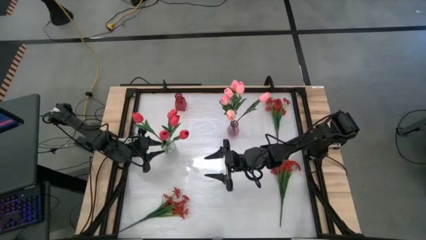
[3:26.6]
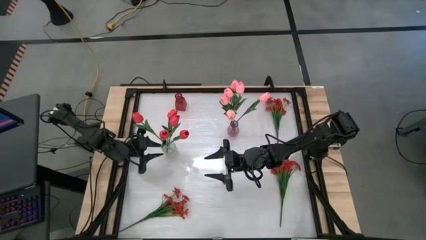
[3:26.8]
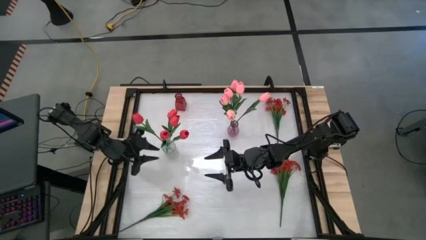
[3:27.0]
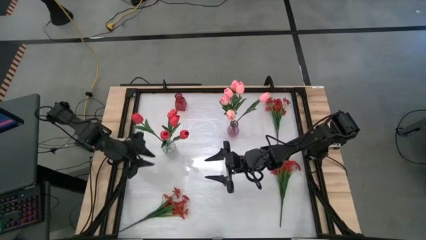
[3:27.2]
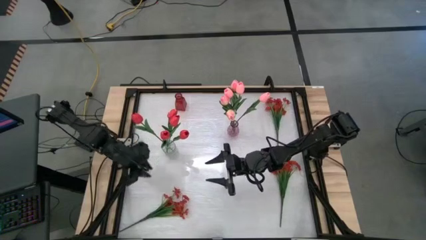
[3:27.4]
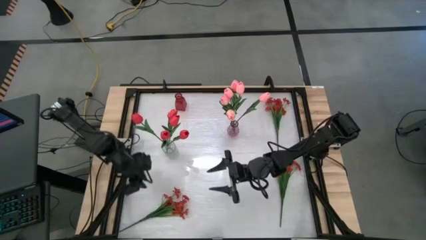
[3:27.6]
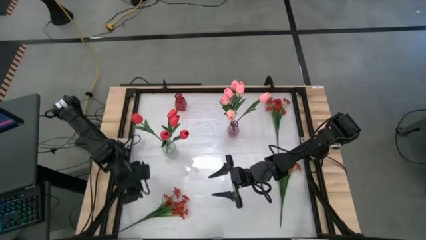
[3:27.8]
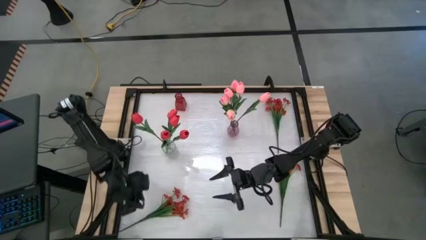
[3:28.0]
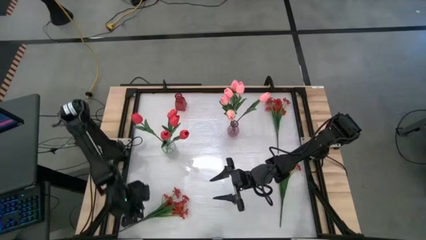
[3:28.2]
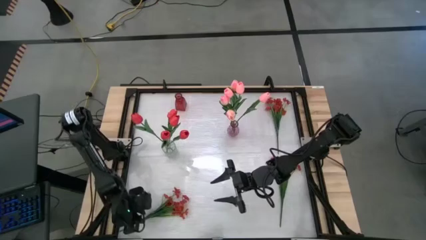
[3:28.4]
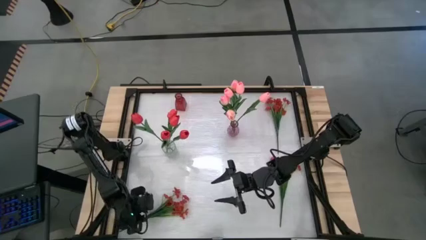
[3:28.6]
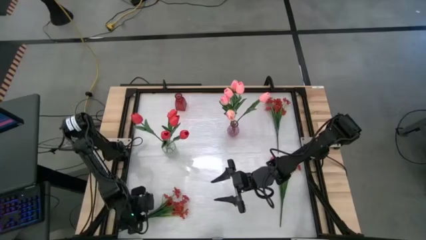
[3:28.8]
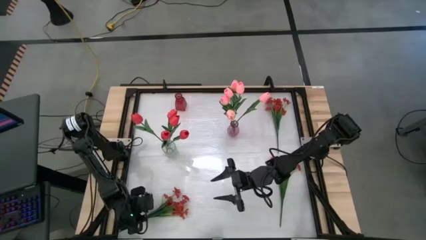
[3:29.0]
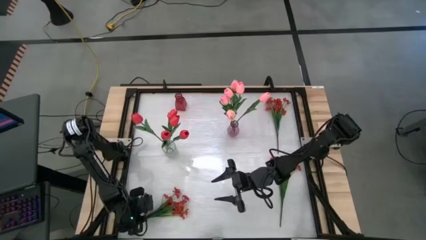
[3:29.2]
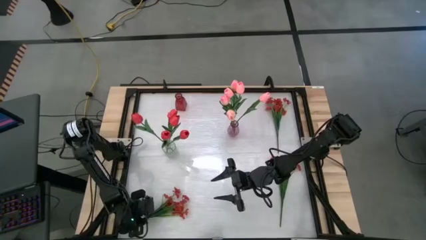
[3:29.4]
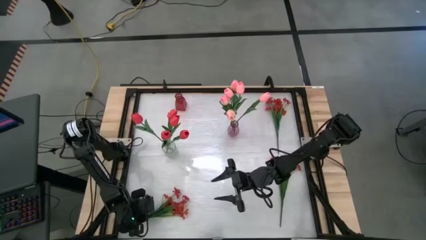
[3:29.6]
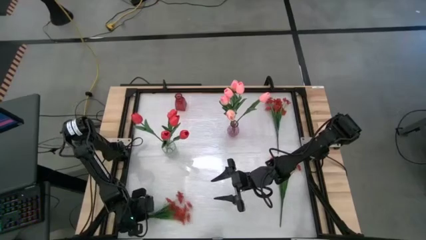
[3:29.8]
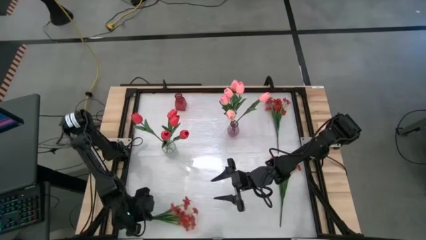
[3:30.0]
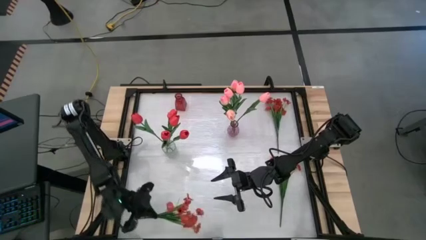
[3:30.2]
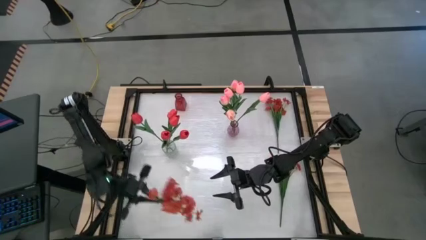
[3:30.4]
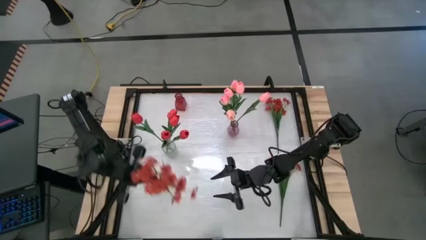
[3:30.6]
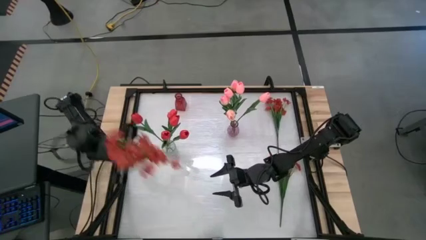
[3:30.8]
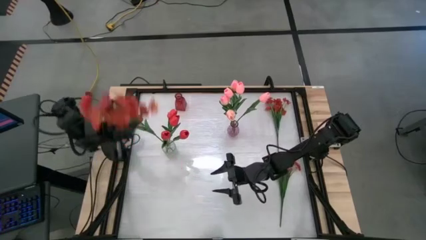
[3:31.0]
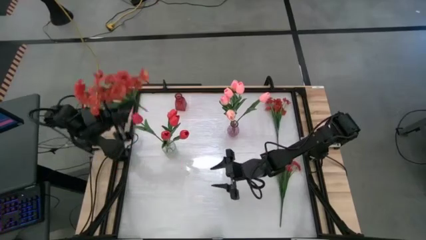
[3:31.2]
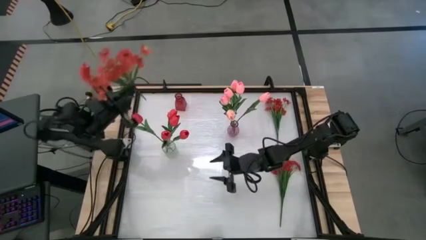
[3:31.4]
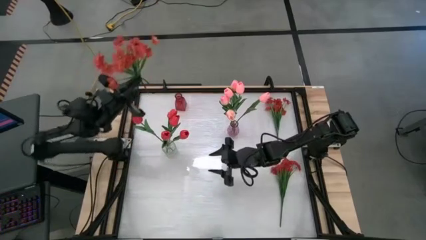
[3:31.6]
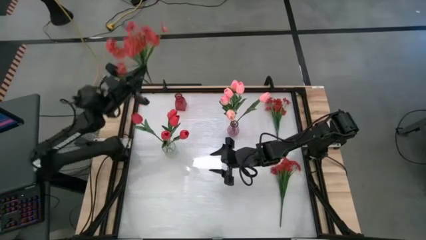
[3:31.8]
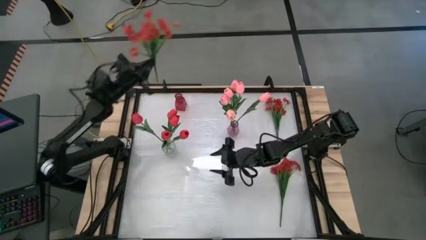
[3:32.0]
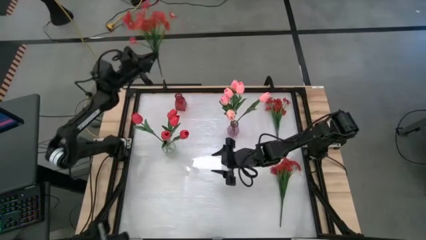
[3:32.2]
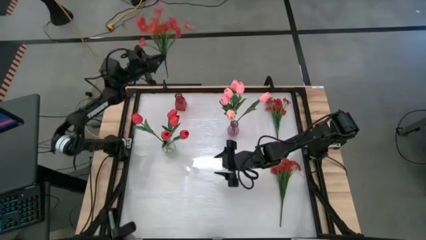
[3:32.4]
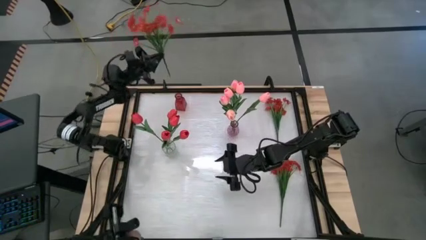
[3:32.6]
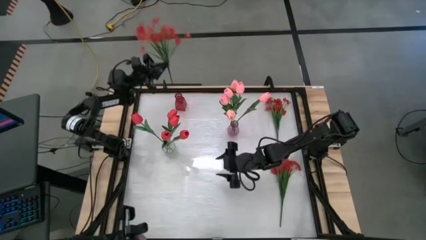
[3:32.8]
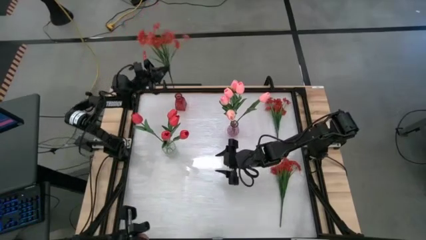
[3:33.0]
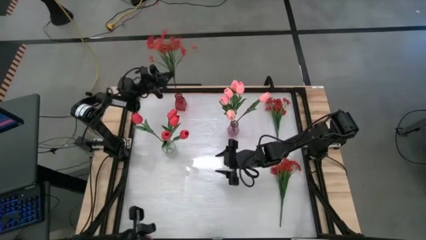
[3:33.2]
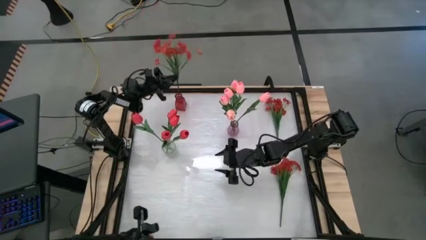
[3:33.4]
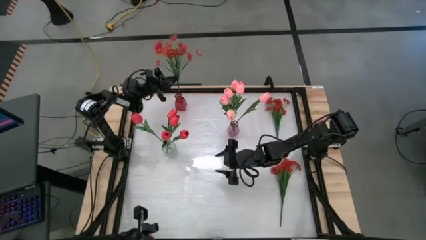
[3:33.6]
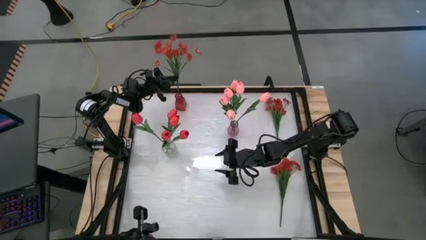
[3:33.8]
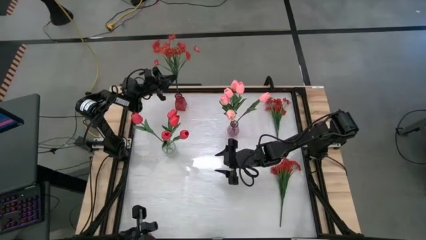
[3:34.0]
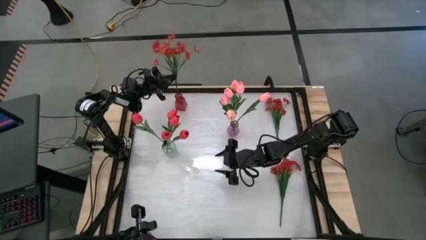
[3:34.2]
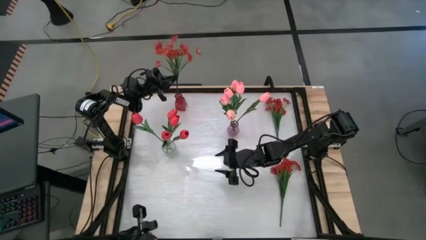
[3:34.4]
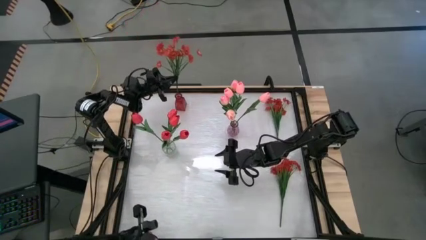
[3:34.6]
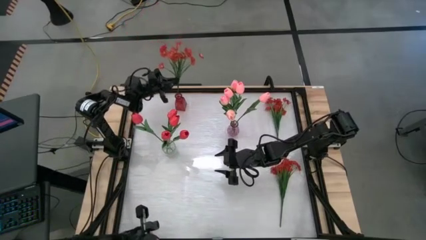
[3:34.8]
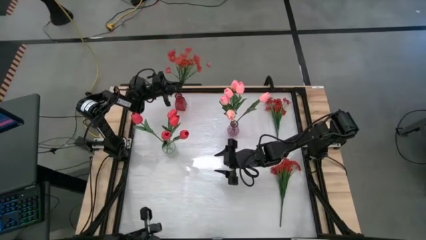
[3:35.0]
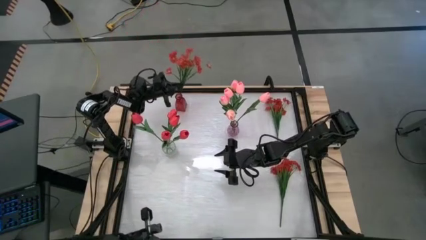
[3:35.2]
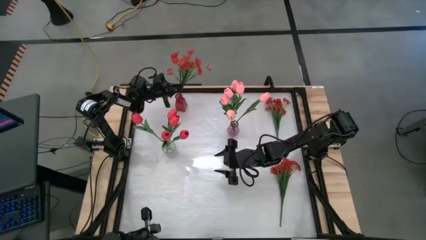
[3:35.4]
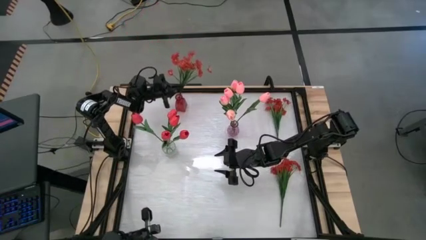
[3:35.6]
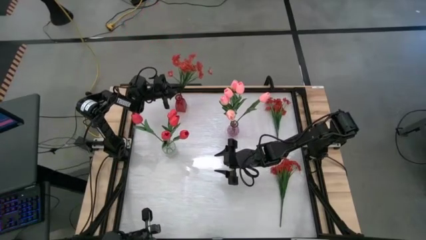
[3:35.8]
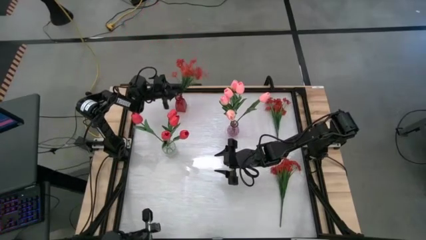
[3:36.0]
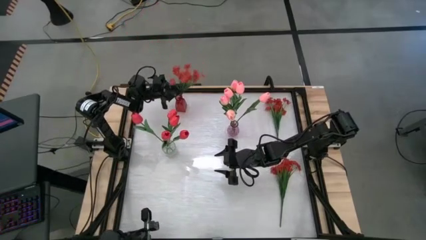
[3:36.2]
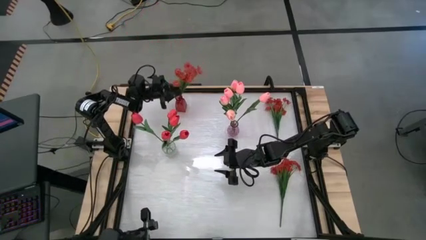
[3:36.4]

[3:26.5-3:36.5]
Task: Sort flowers into vase by color
Put the red flowers into the red vase

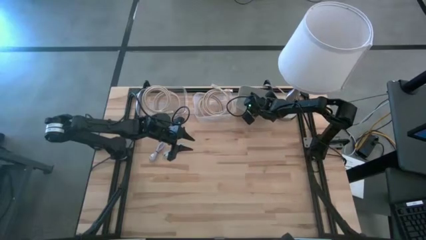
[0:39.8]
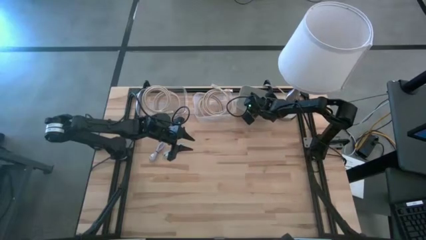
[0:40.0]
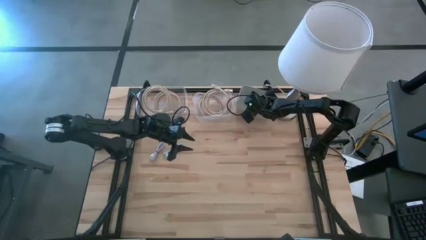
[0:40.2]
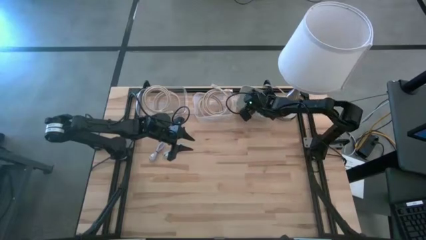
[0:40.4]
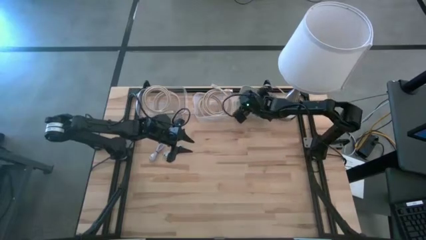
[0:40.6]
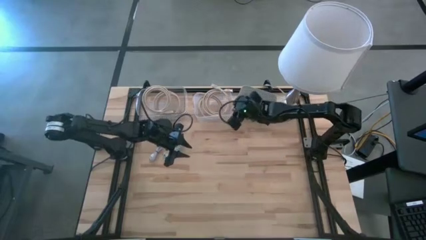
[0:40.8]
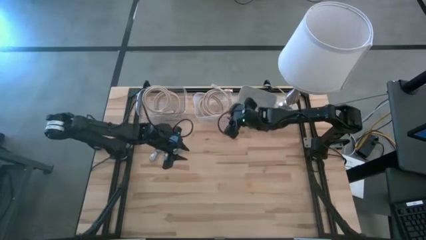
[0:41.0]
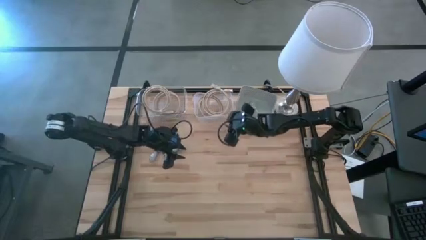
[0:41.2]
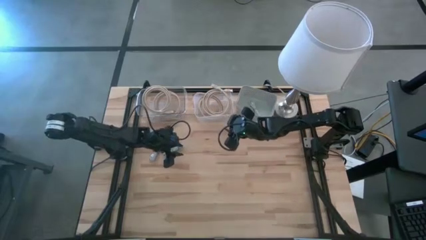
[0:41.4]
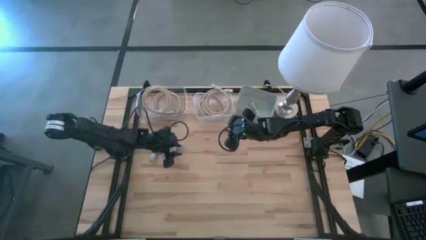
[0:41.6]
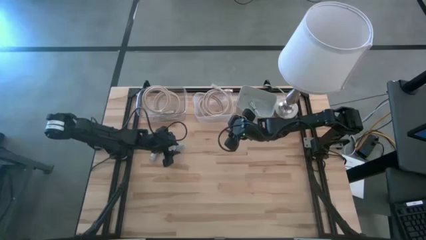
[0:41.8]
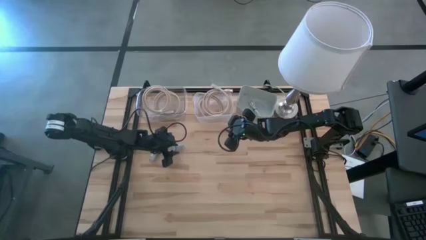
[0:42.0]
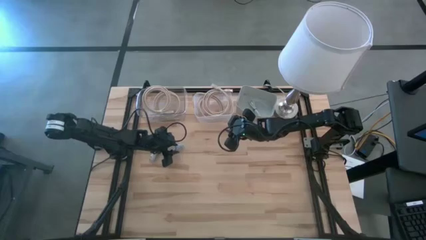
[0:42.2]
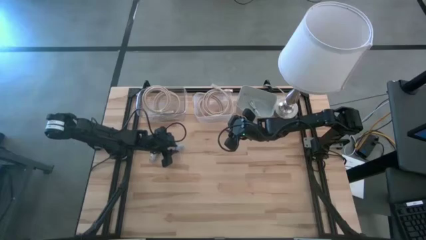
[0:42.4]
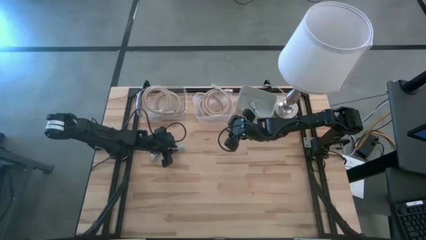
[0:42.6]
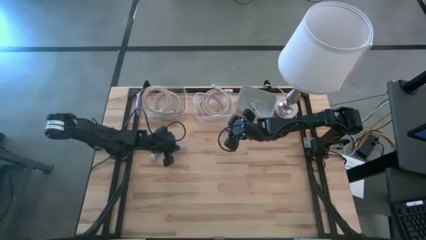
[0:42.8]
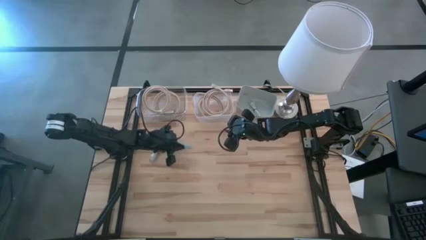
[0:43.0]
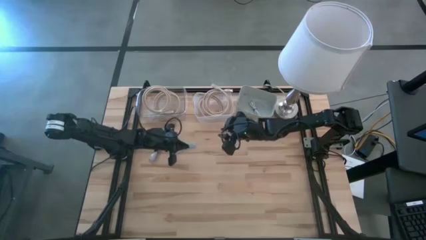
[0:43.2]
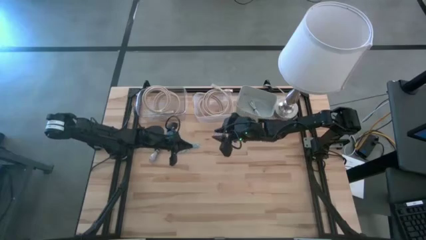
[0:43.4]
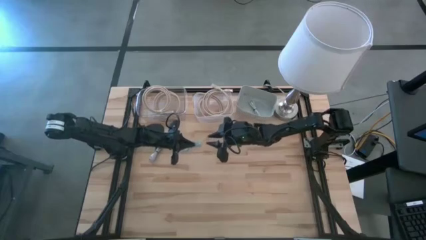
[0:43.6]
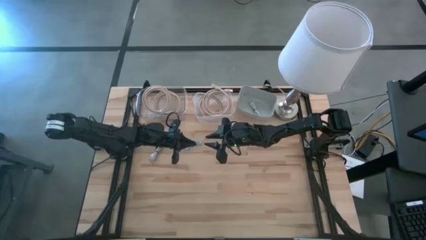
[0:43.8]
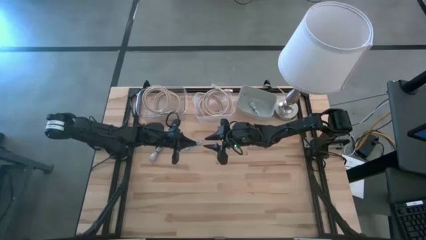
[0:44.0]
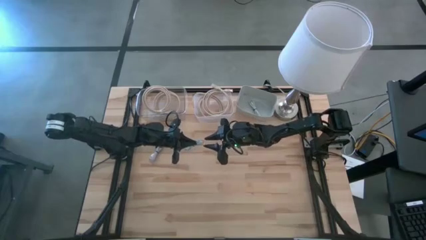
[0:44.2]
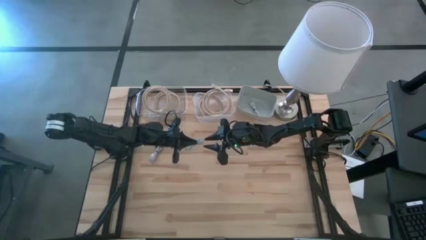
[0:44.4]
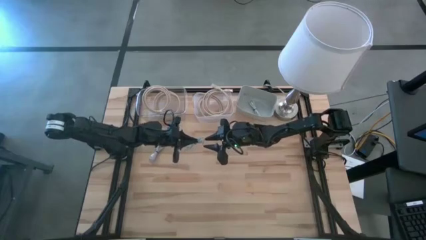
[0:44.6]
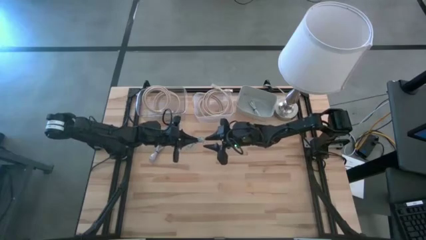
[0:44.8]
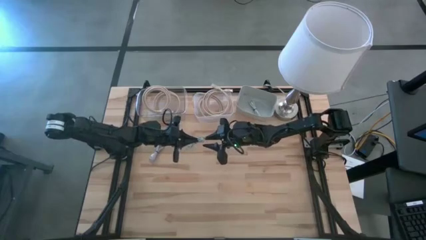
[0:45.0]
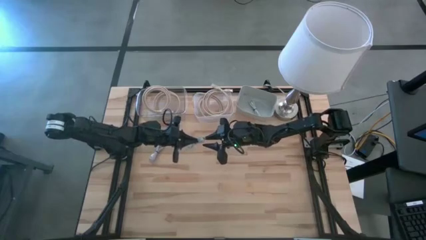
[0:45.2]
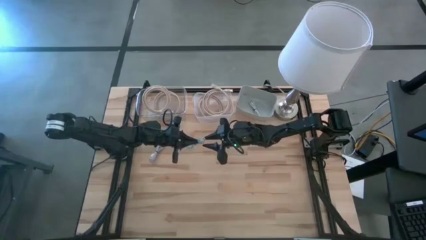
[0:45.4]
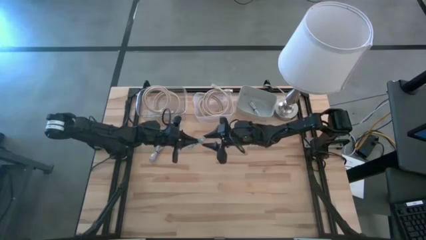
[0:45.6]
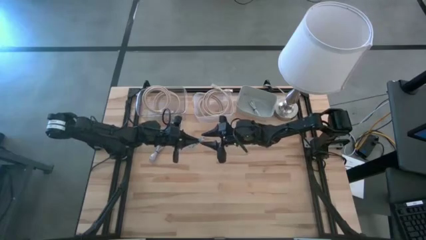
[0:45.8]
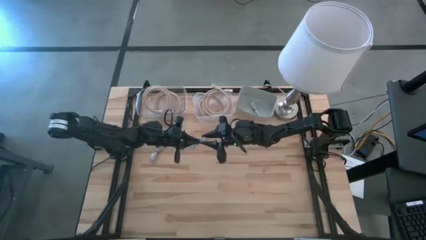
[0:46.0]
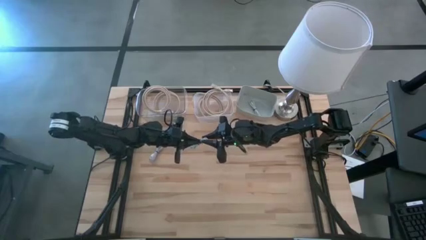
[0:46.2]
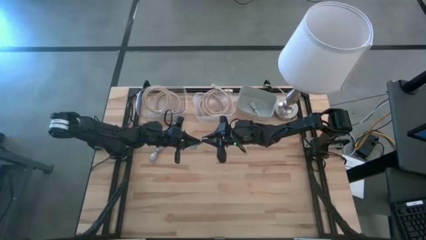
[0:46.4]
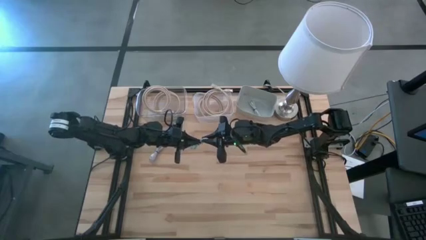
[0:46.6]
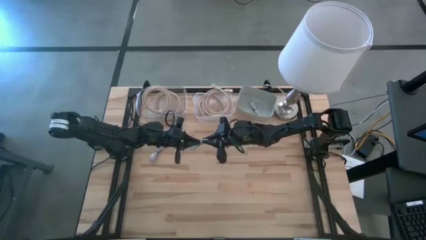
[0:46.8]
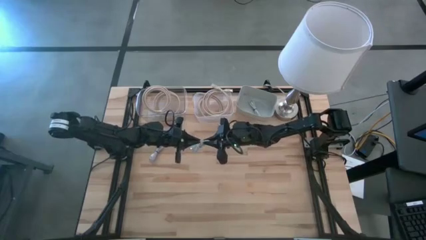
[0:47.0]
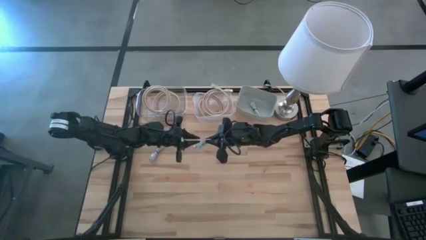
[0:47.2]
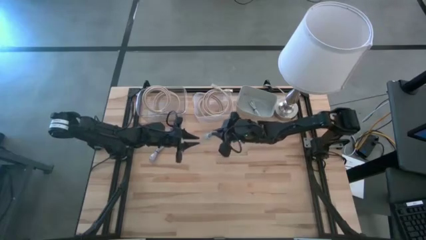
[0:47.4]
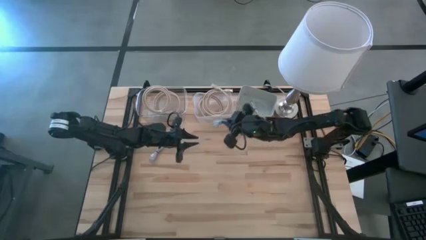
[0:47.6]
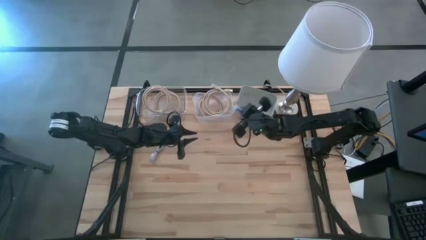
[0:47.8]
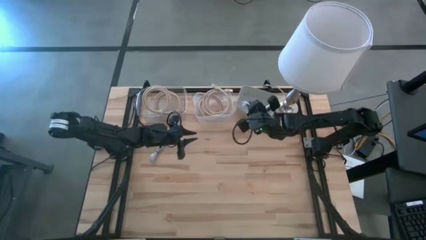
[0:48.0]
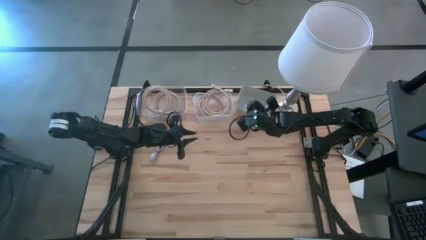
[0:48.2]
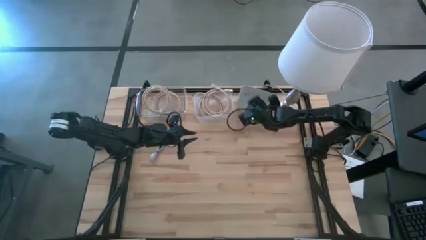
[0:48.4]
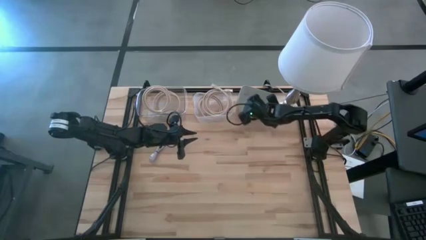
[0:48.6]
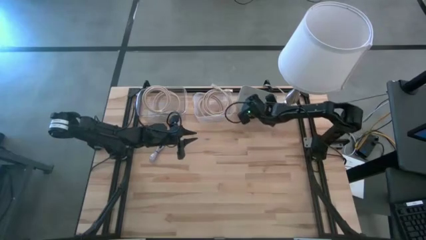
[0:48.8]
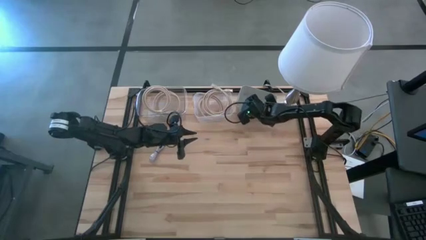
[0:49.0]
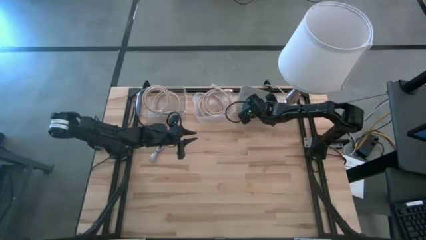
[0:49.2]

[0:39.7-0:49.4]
Task: Pick & Place USB Port
Put the blue USB cable into the gray bin
